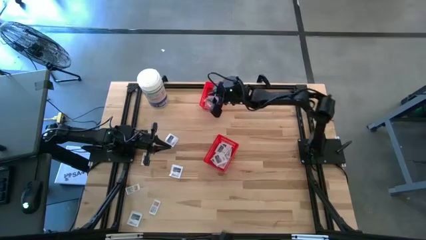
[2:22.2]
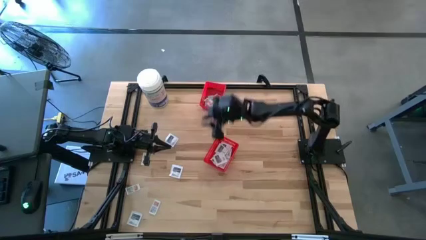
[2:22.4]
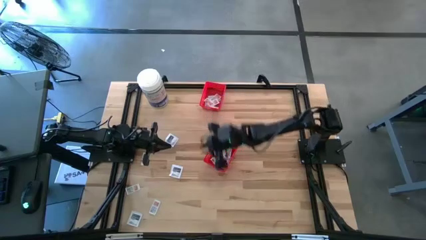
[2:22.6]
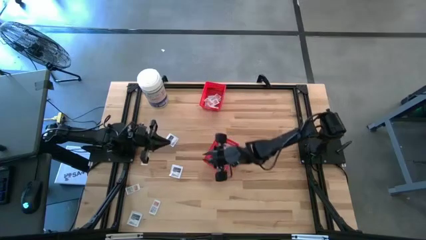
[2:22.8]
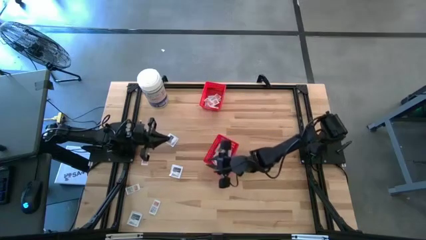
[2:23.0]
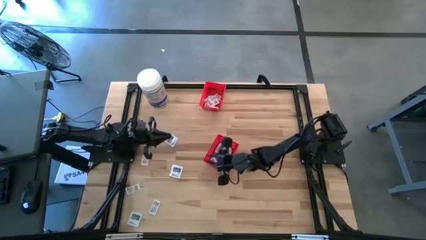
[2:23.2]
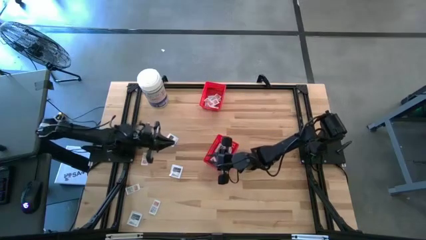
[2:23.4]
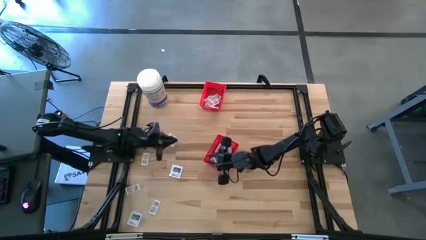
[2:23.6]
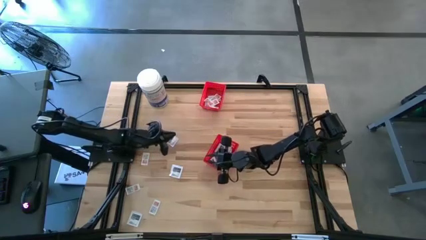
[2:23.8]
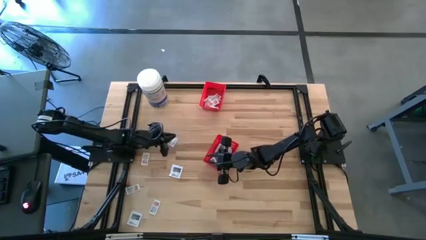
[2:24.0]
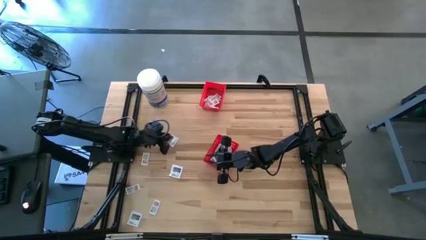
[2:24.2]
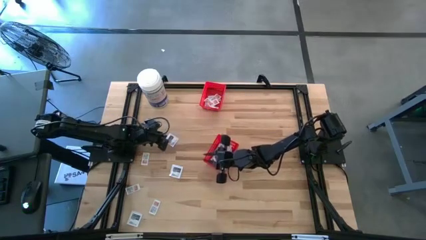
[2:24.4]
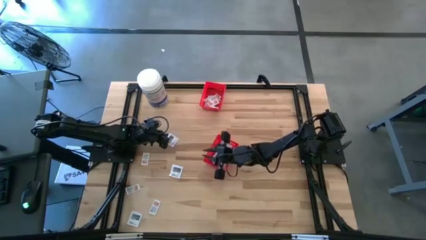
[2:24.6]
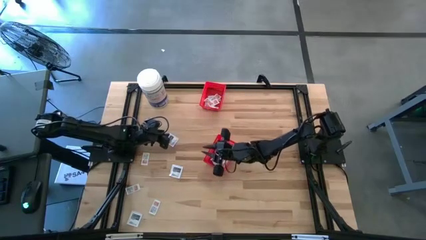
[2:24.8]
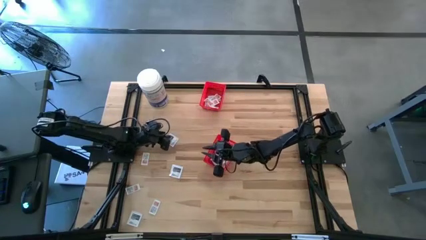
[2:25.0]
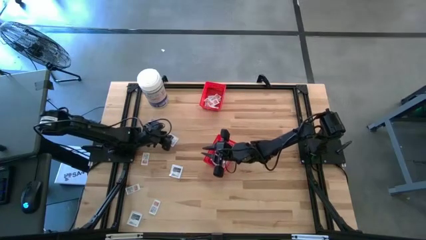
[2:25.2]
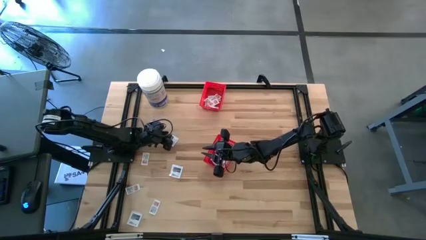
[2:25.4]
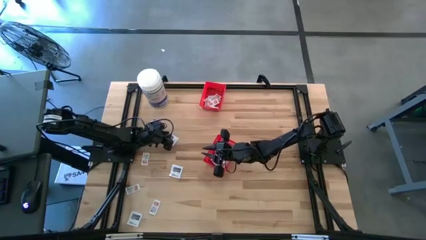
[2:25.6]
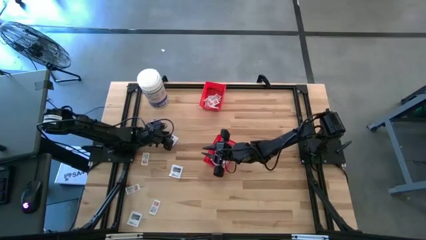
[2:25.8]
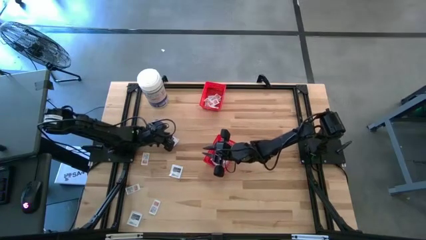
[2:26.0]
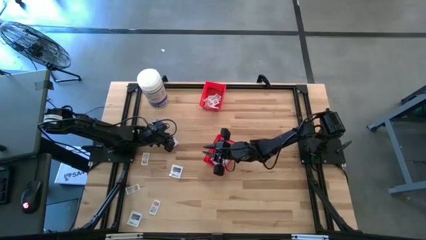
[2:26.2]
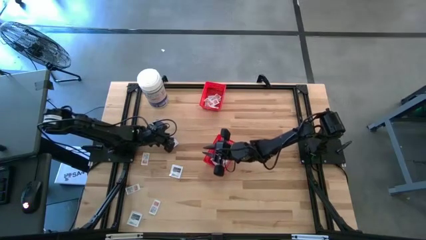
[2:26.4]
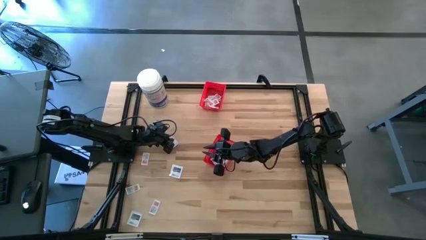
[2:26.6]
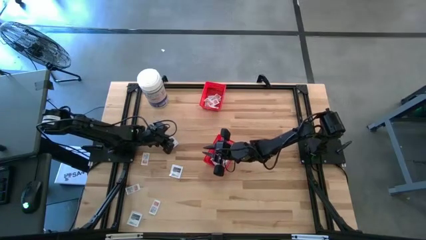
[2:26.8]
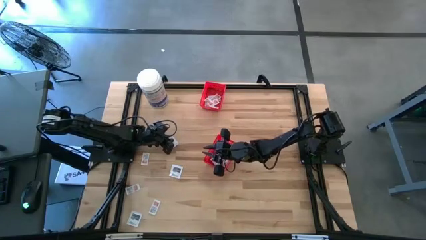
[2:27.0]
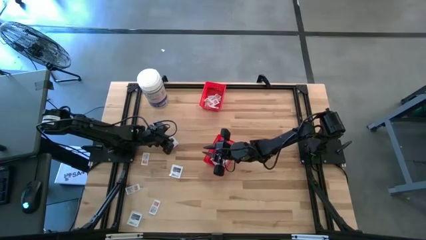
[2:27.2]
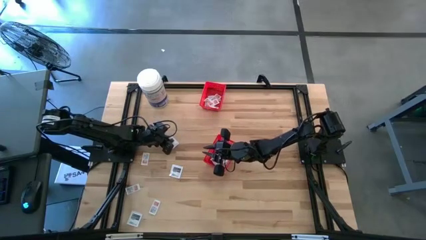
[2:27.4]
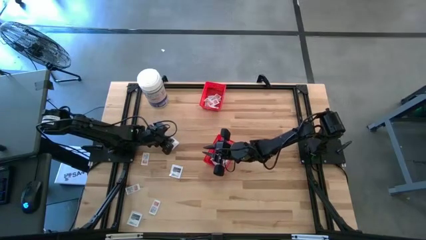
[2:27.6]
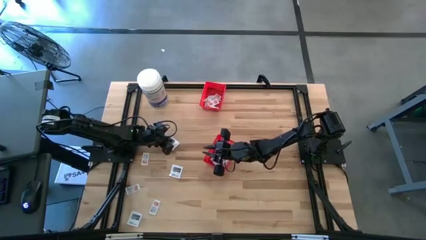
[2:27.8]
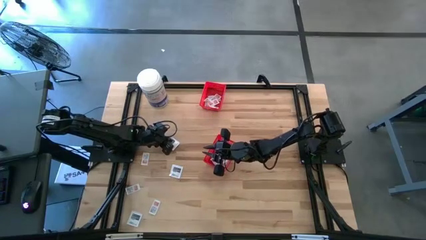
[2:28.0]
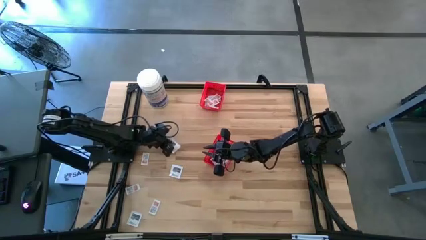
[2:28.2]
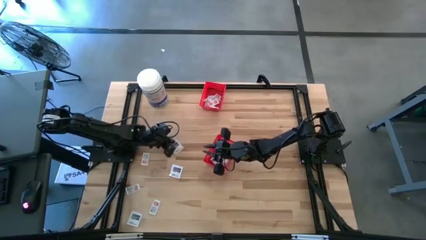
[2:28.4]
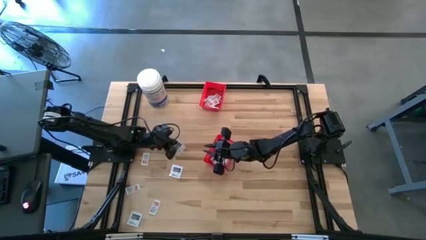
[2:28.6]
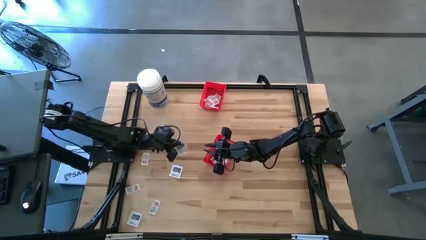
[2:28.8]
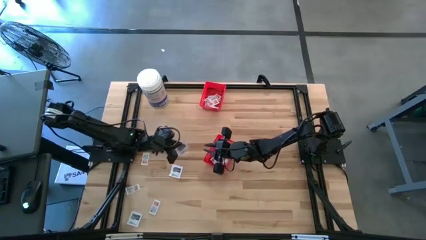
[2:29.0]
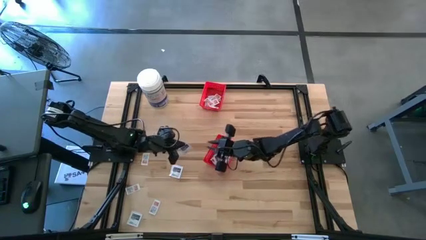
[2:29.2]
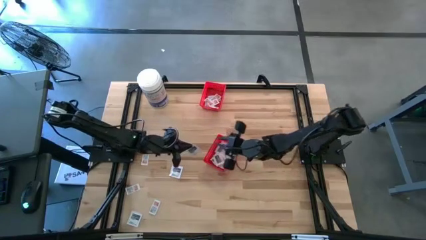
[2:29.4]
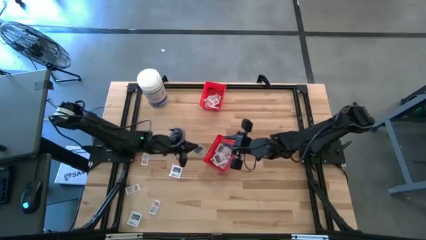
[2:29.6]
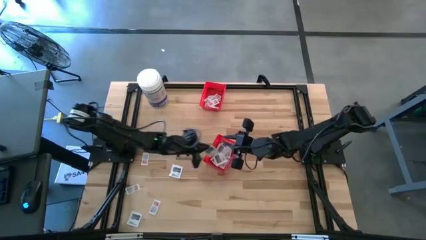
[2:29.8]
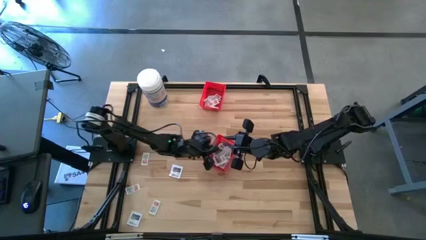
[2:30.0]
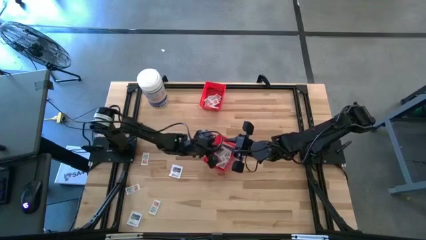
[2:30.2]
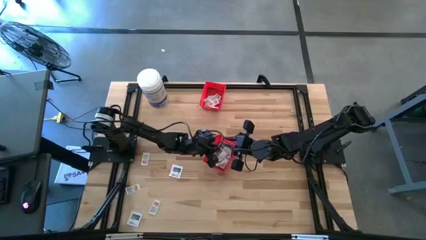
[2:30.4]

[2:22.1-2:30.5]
Task: Pick & Place First Aid Supplies
Put the white towelette pack into the bottom red bin

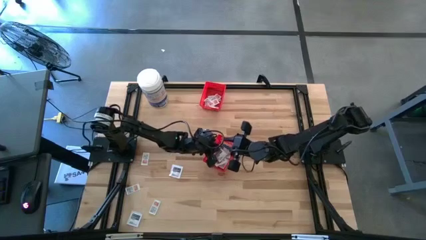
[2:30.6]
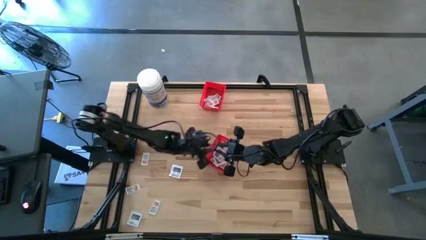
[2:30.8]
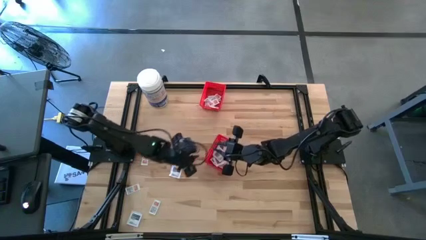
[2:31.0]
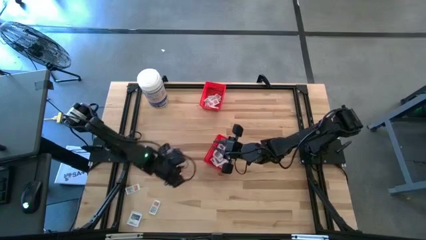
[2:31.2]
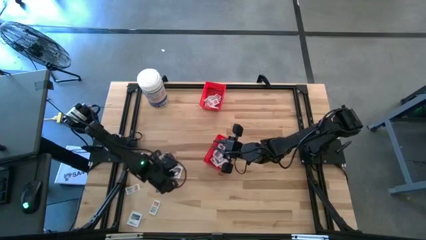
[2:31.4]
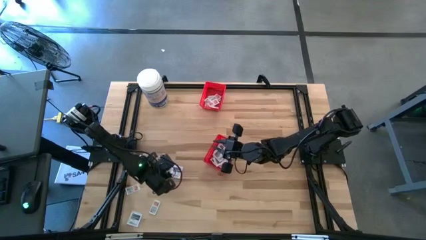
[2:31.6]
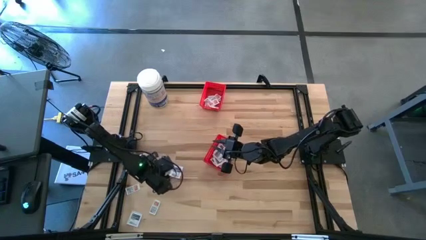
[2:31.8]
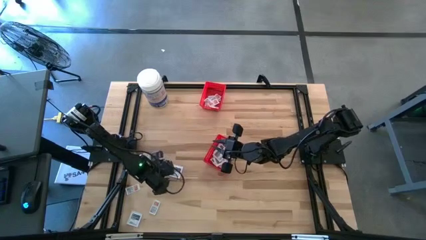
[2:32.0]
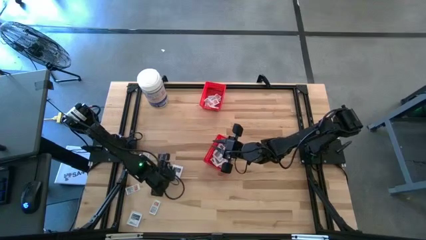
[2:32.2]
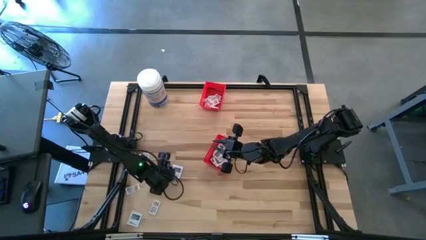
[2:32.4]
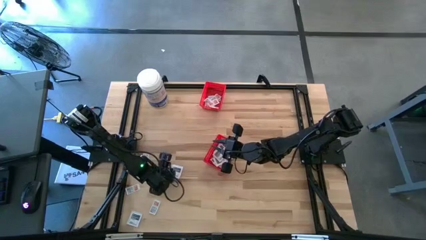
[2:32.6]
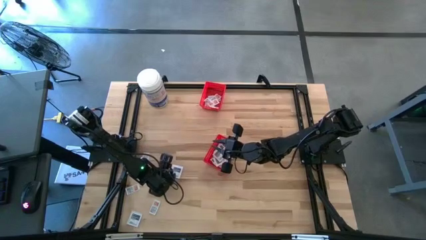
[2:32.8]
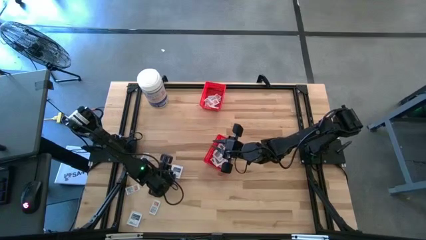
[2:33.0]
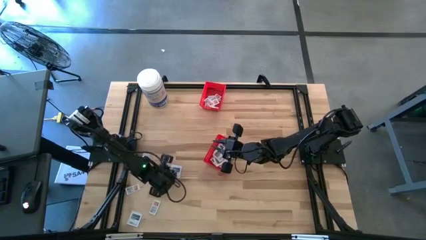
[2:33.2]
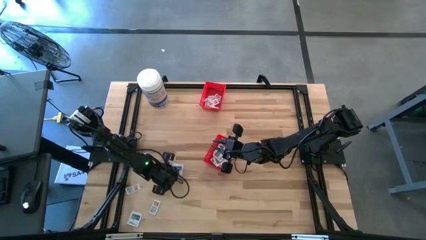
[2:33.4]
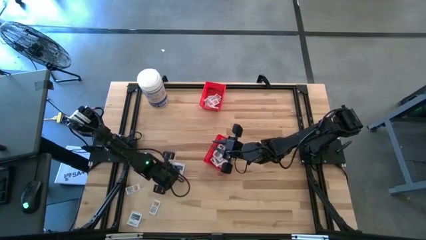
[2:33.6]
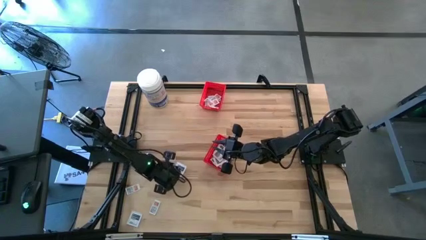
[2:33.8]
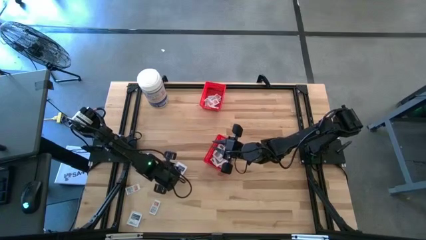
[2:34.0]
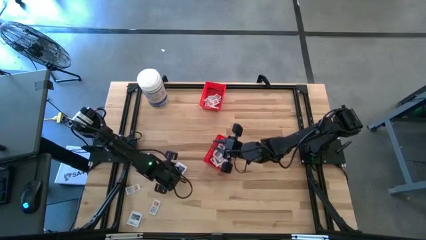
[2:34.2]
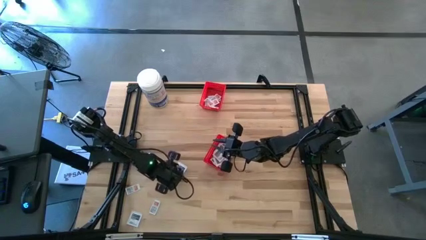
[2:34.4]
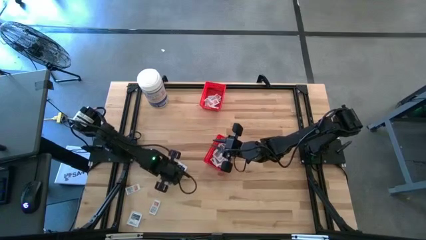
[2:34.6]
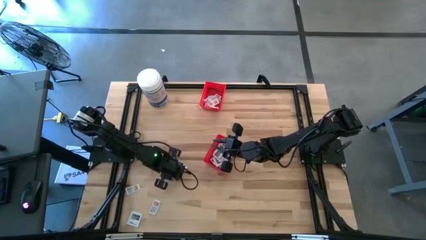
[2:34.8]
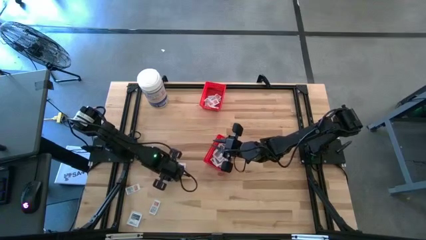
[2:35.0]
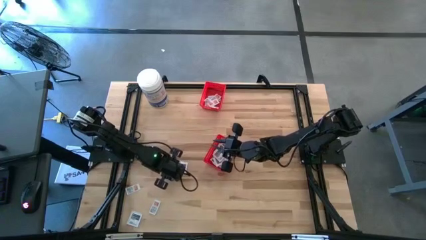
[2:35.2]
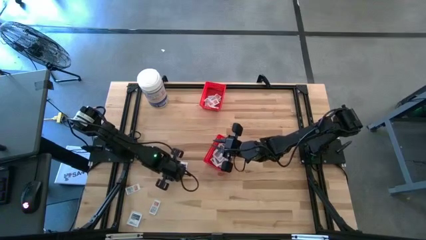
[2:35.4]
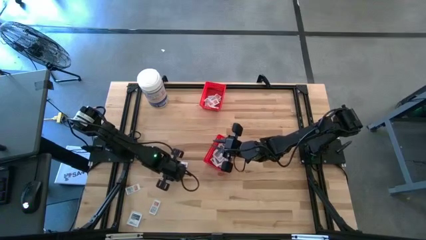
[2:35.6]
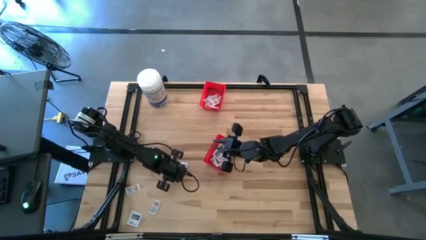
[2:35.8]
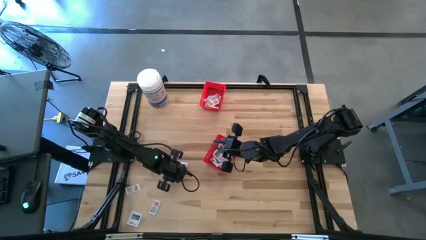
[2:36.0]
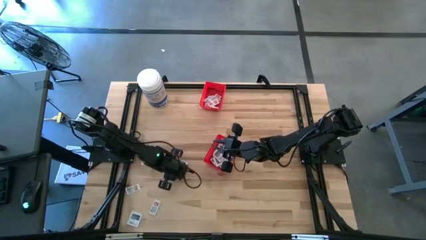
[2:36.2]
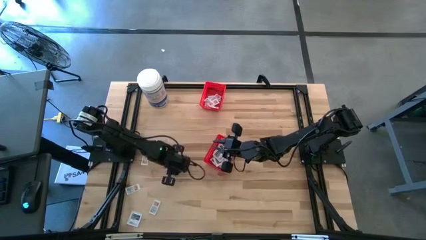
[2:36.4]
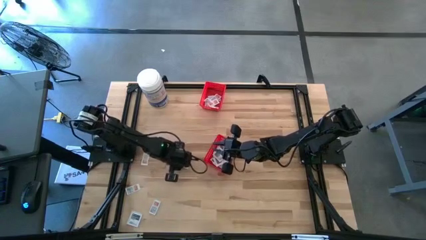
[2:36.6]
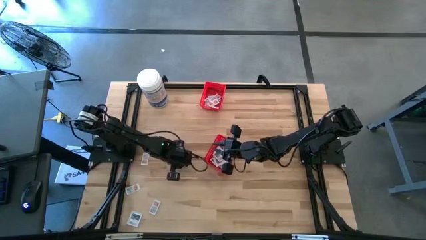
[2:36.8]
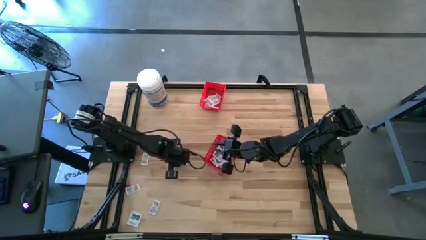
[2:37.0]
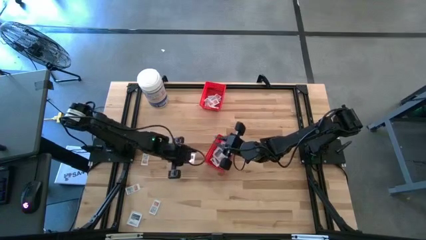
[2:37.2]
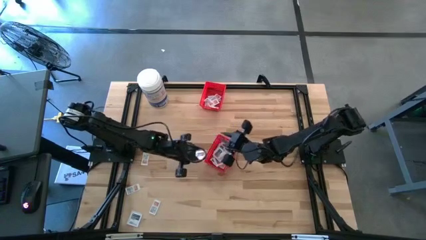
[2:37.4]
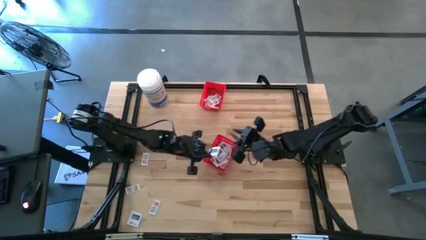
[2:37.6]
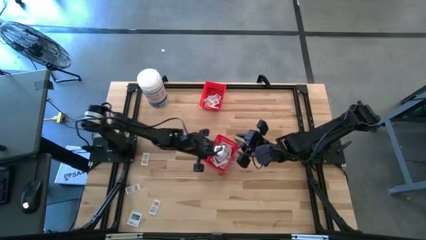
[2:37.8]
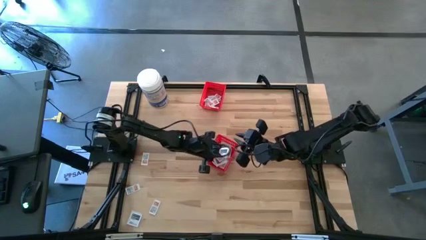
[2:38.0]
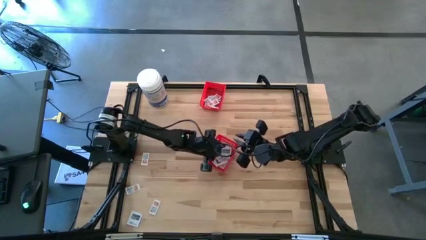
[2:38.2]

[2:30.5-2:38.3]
Put the white towelette pack into the bottom red bin
